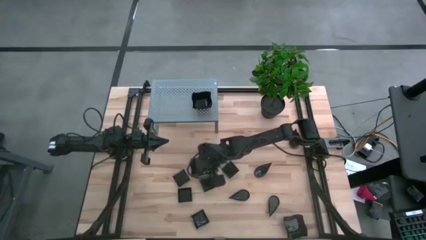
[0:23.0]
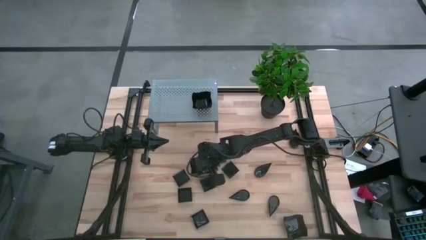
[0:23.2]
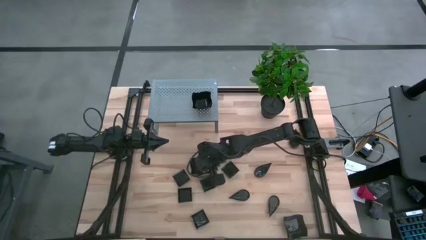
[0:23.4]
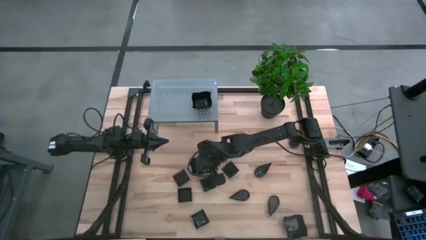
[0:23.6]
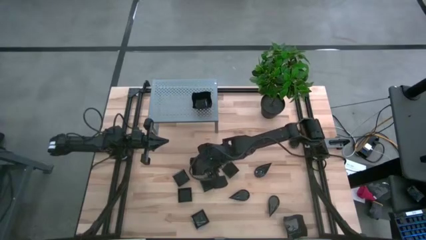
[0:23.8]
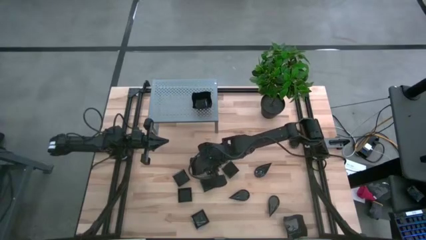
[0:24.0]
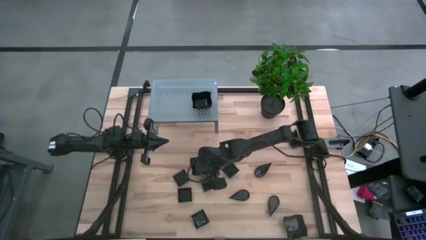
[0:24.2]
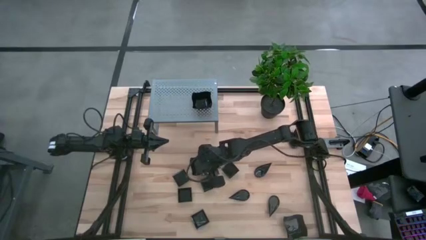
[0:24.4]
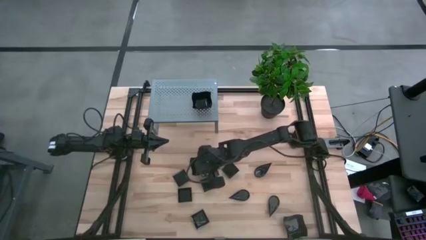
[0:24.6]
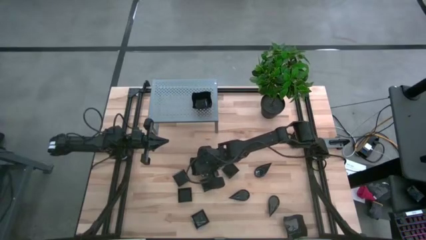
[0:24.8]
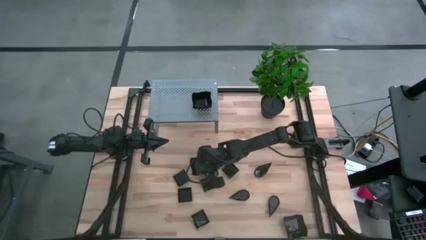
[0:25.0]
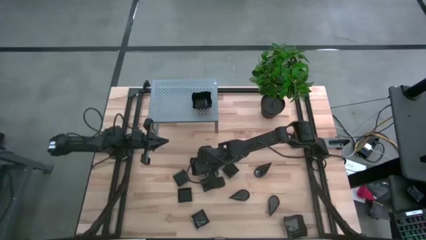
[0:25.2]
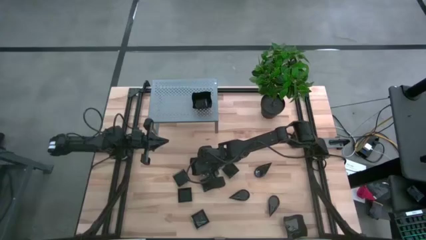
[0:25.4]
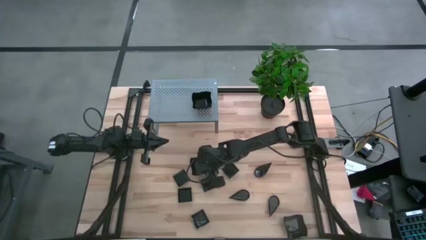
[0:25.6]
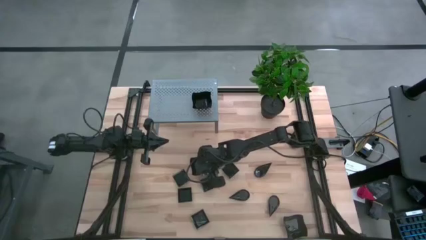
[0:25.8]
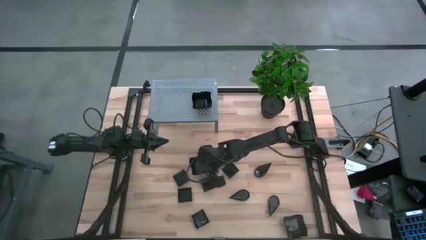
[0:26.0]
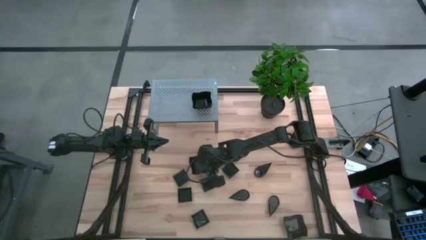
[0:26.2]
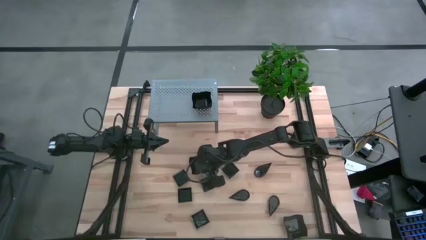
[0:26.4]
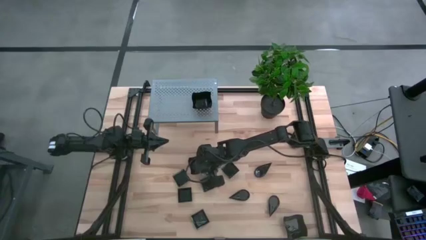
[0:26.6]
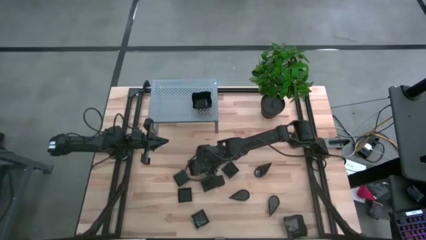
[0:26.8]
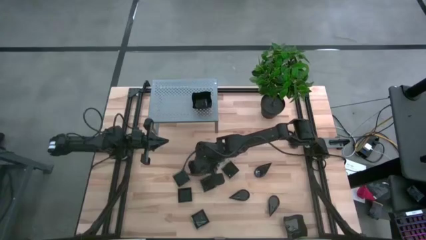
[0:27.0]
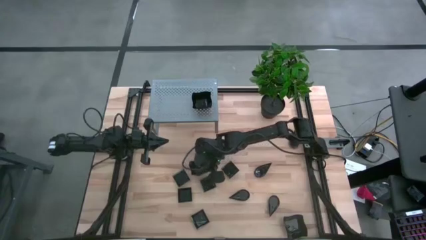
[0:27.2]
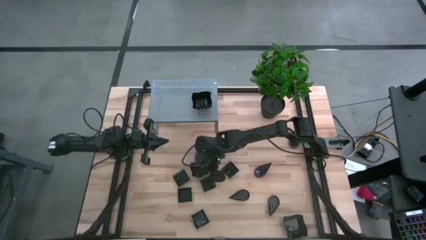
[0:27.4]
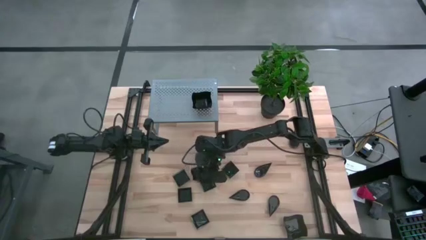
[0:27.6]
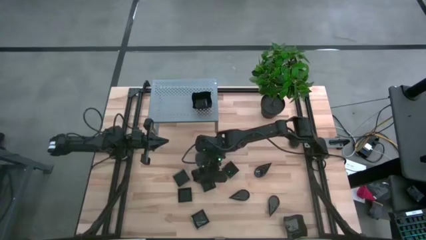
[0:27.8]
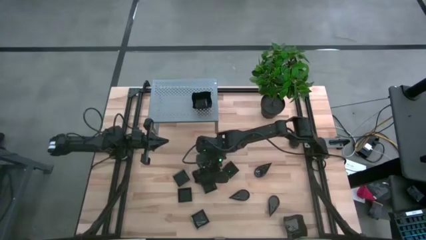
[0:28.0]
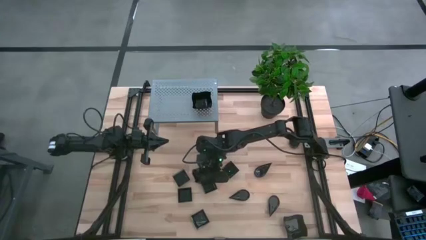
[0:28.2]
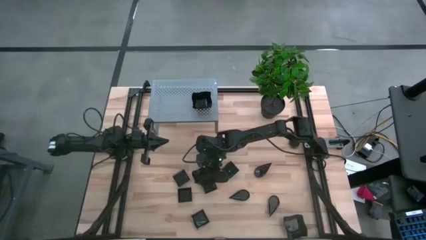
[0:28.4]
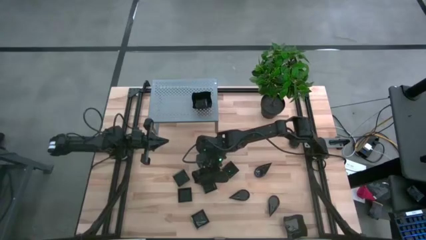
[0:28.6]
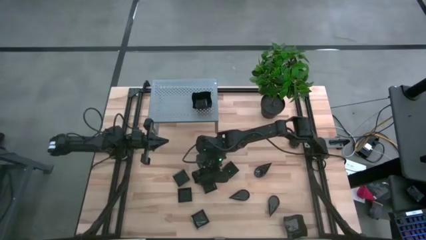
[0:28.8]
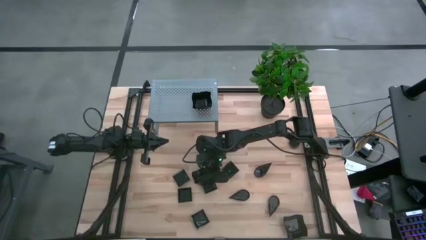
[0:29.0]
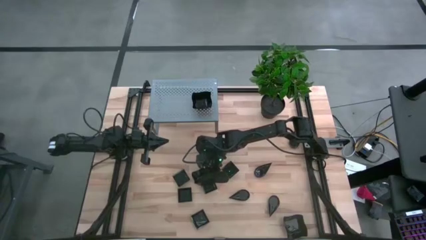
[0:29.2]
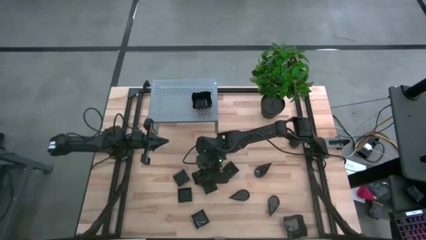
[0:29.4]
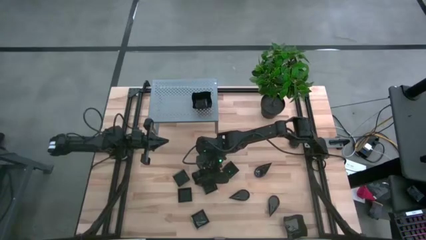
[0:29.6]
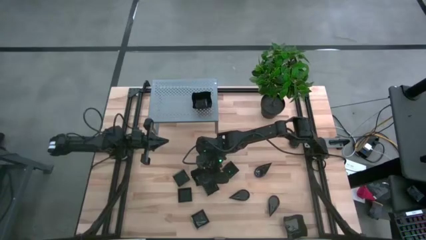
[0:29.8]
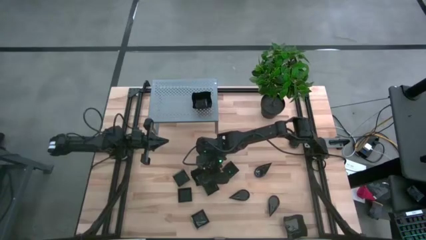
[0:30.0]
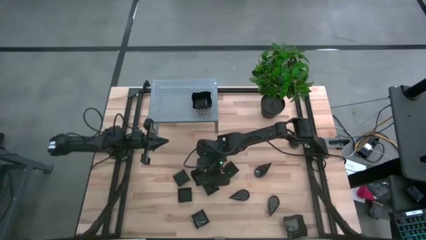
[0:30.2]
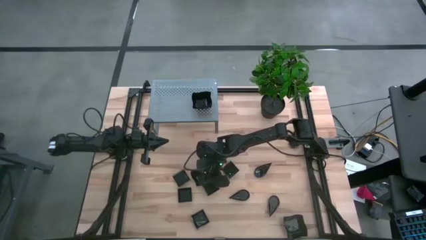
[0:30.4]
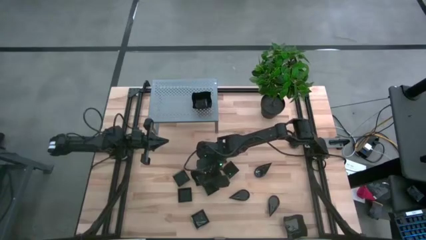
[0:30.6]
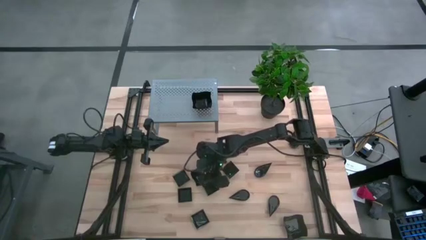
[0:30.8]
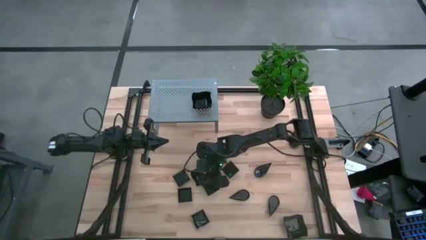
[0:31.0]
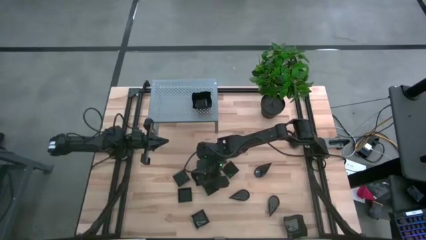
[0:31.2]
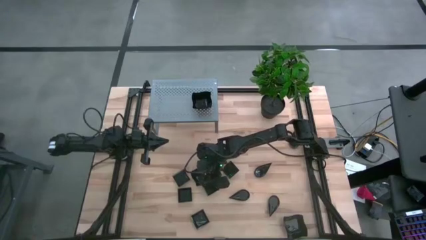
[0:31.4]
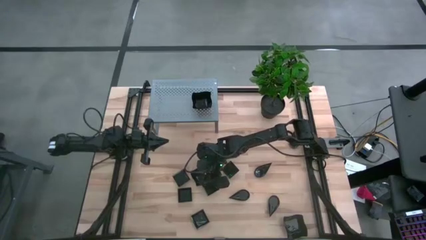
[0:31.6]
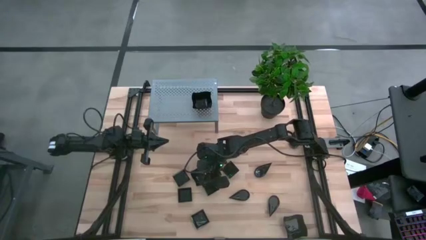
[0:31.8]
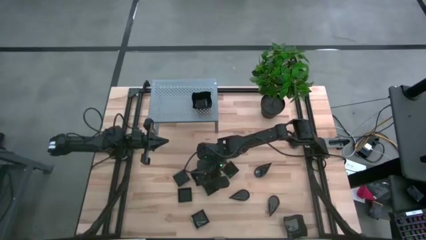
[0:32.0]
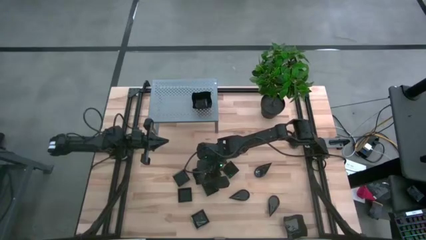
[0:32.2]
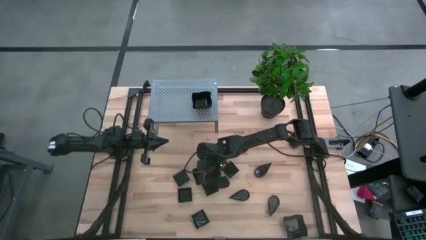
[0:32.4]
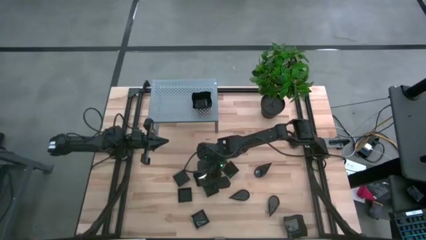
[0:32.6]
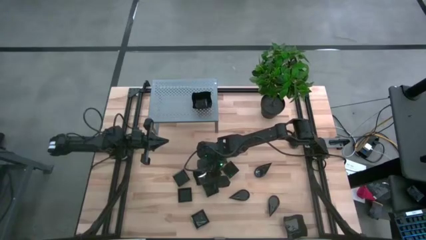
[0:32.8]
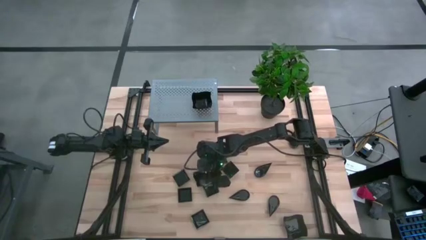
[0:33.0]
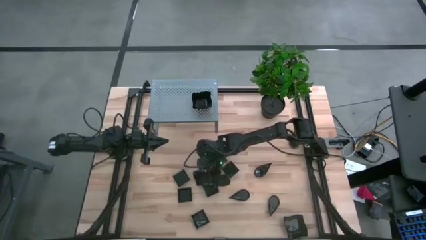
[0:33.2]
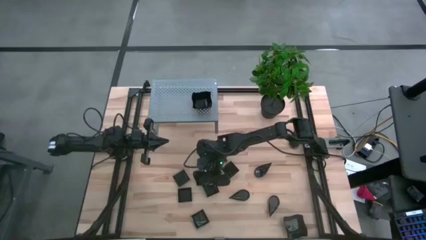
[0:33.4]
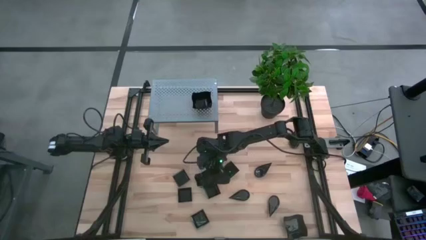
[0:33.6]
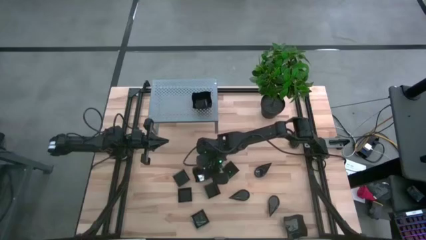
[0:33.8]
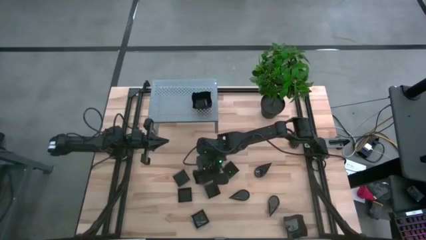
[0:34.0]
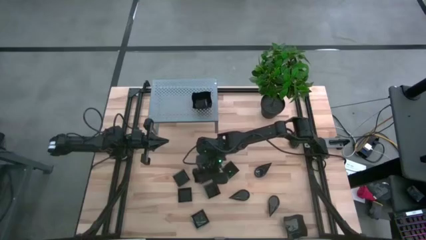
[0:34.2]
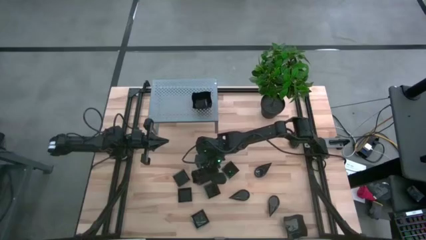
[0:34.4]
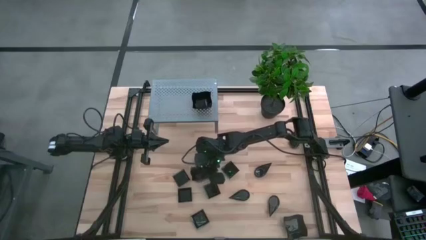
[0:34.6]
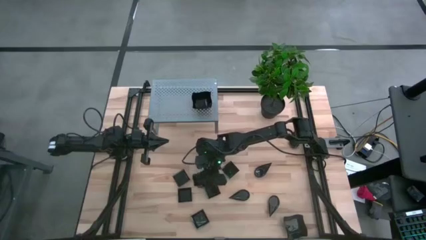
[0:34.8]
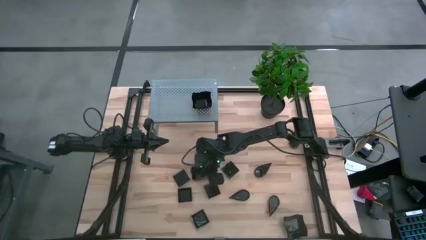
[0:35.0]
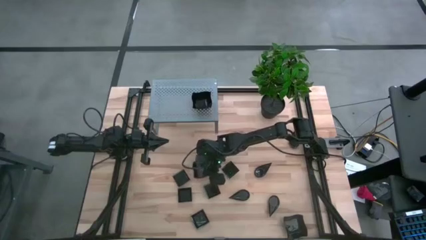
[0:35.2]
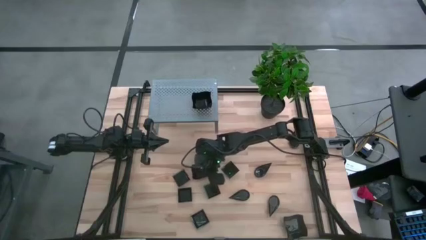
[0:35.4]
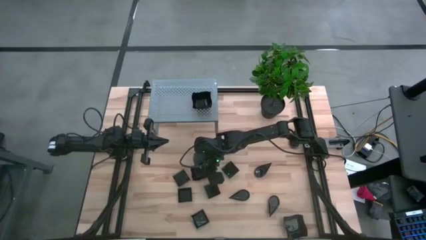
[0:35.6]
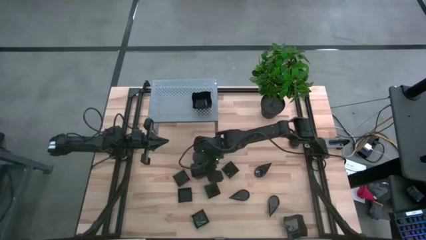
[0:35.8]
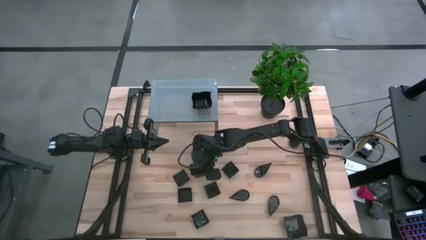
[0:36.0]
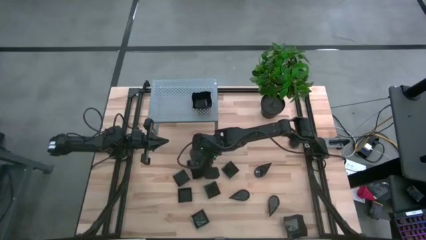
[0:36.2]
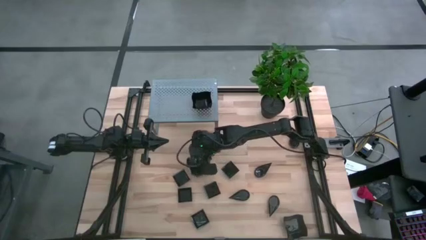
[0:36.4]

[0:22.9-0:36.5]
Task: Pick & Place Mini shaped plates
Stack the distorted square plate on top of the distorted square plate on the shelf

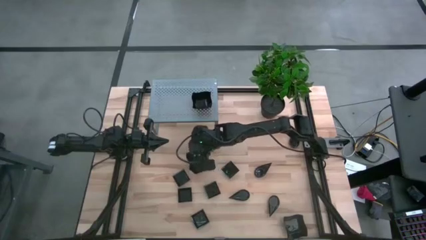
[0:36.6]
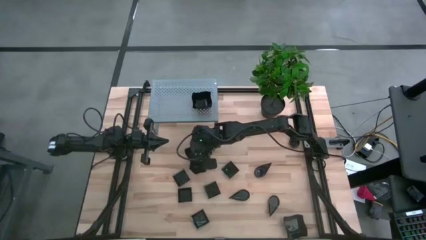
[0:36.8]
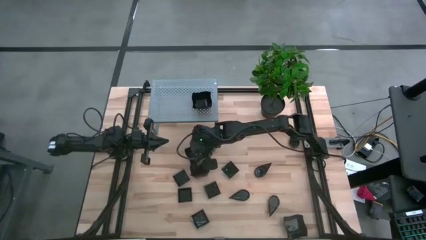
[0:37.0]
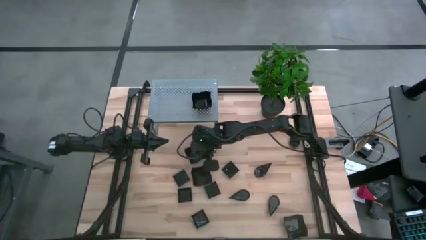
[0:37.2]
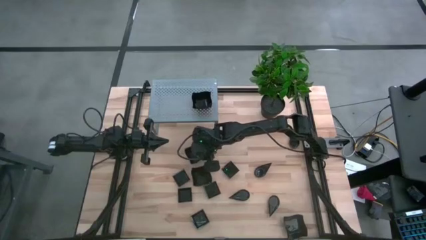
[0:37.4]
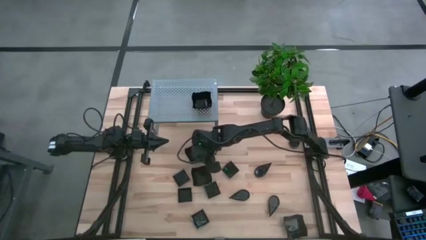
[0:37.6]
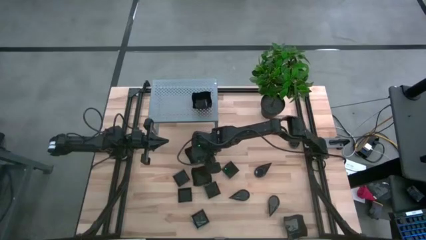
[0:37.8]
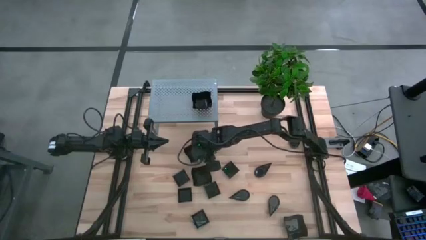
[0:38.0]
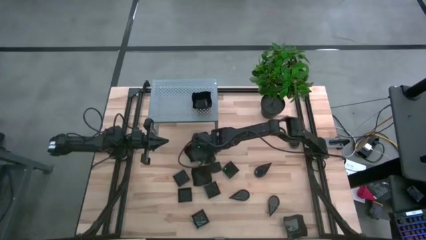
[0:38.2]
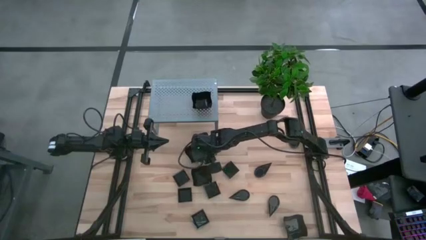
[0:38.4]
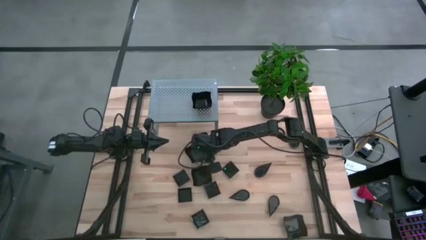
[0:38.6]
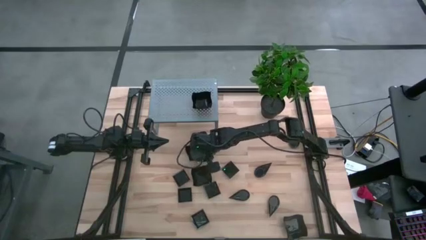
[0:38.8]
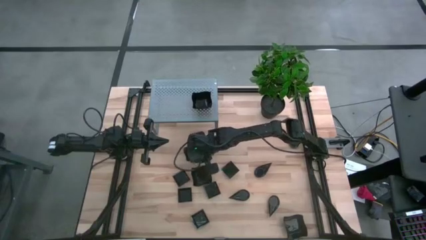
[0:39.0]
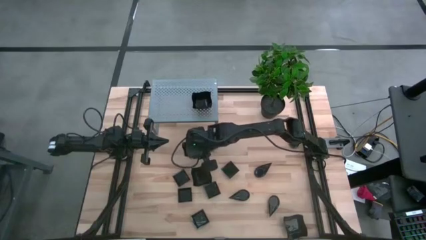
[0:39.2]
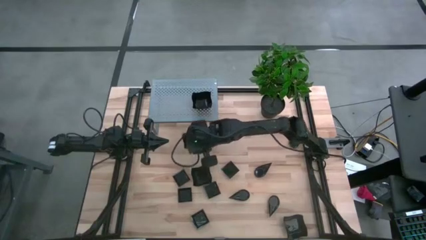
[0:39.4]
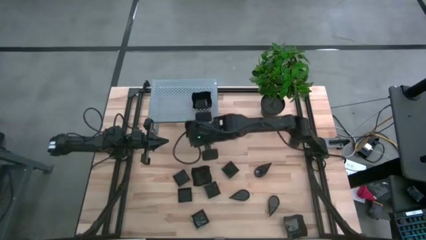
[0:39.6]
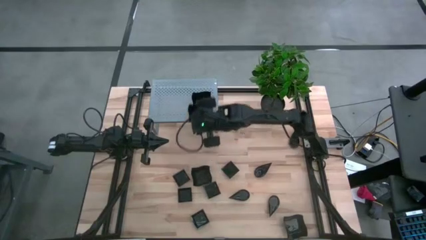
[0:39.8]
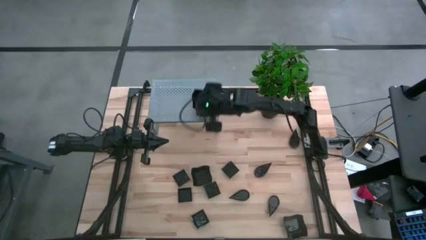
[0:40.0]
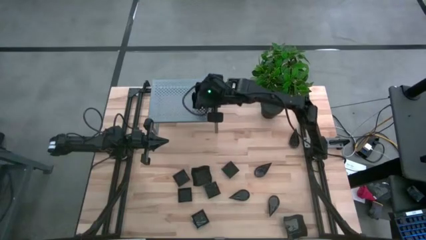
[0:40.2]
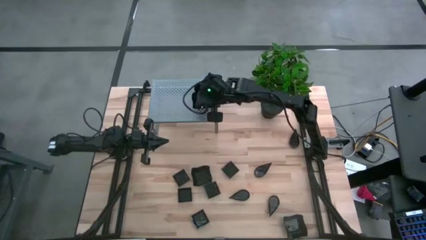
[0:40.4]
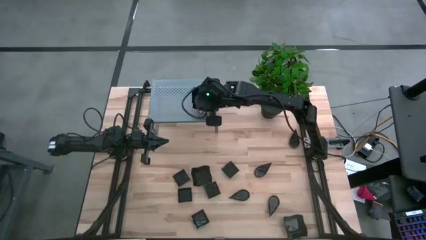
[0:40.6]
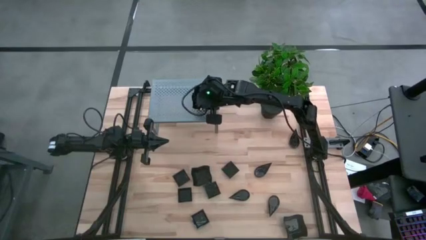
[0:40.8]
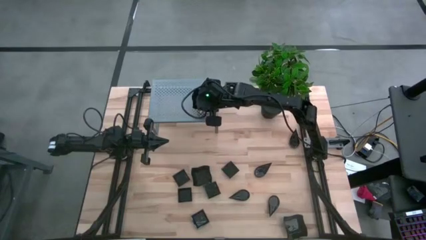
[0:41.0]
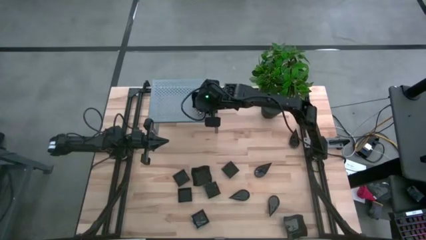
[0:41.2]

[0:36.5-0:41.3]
Stack the distorted square plate on top of the distorted square plate on the shelf
